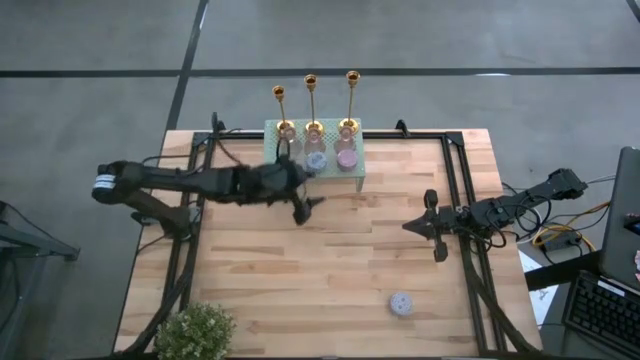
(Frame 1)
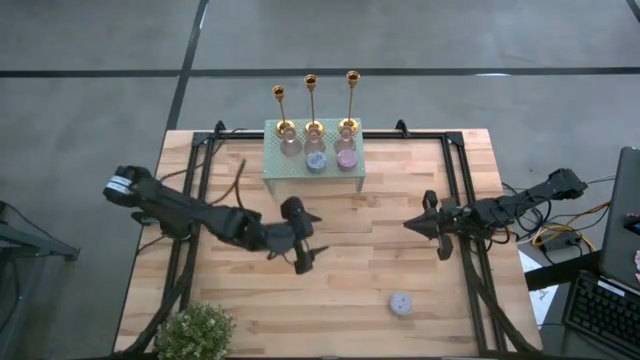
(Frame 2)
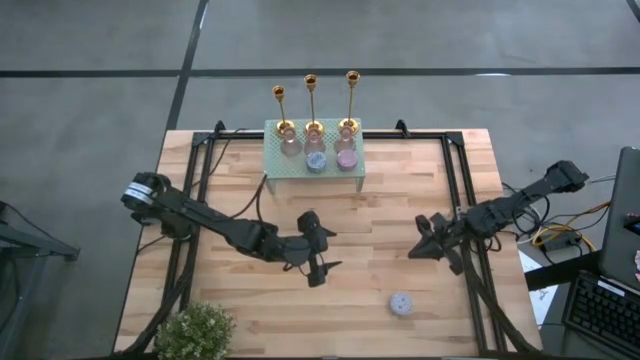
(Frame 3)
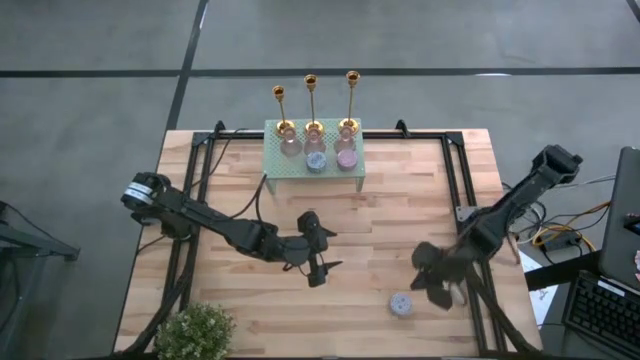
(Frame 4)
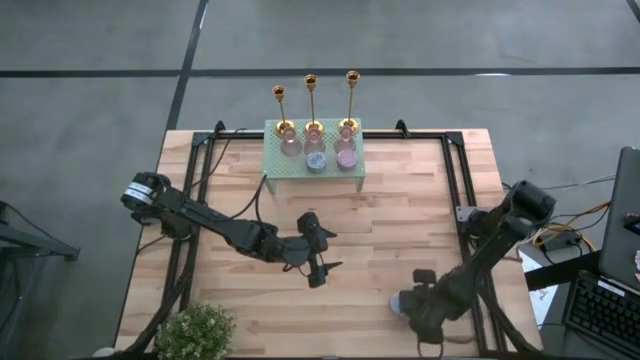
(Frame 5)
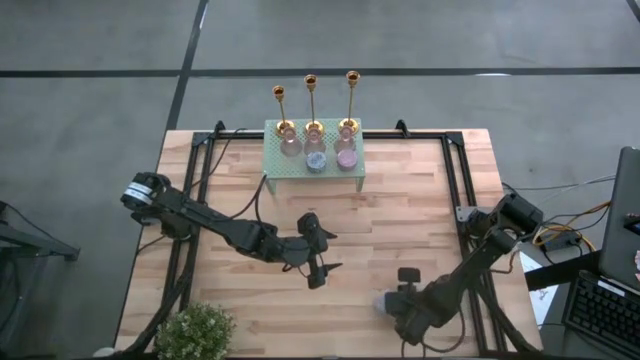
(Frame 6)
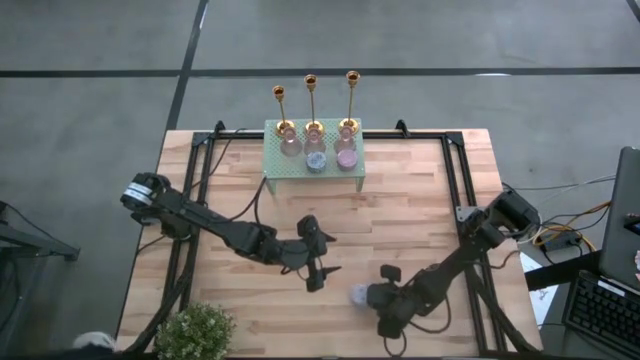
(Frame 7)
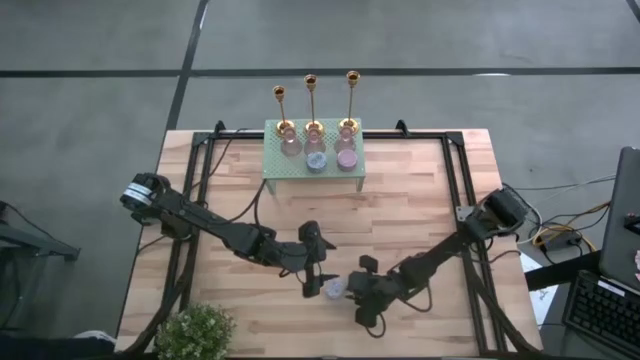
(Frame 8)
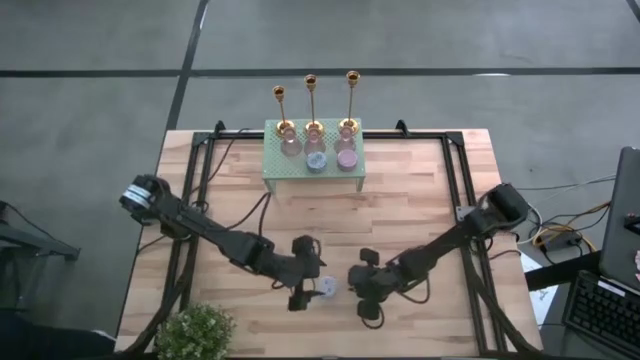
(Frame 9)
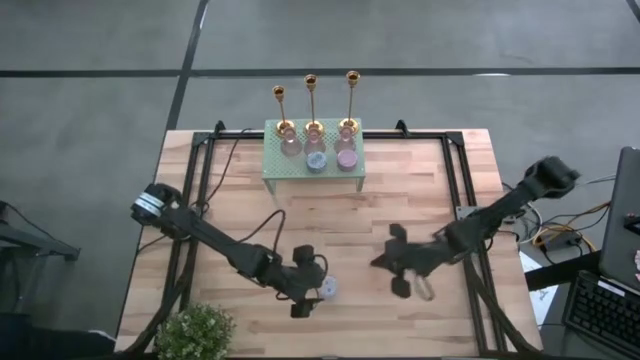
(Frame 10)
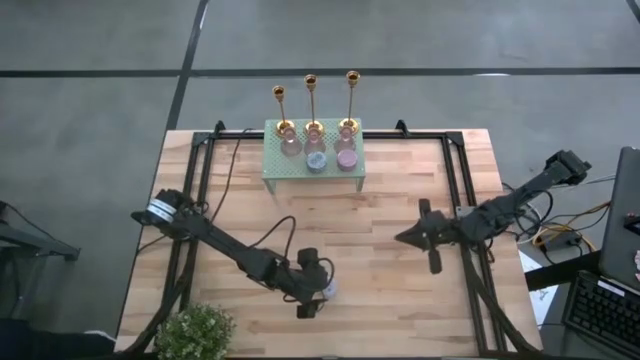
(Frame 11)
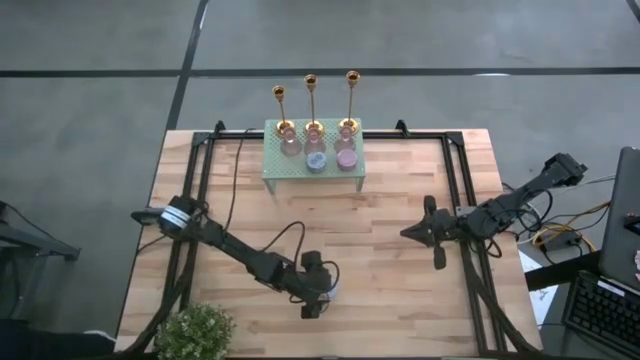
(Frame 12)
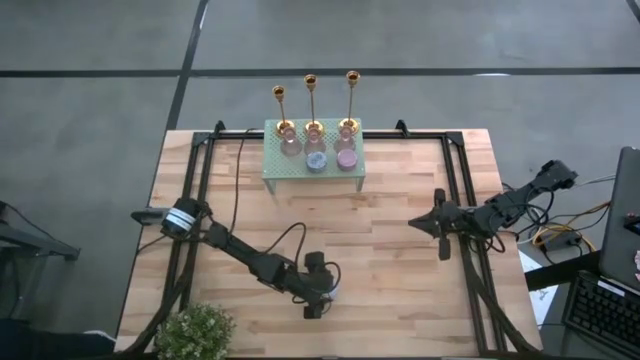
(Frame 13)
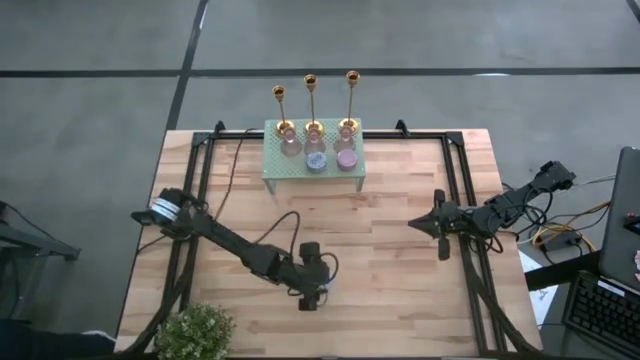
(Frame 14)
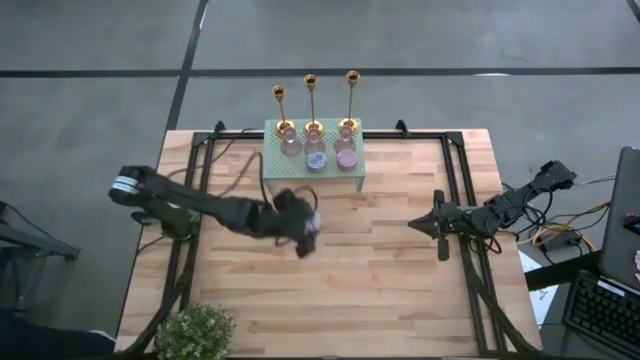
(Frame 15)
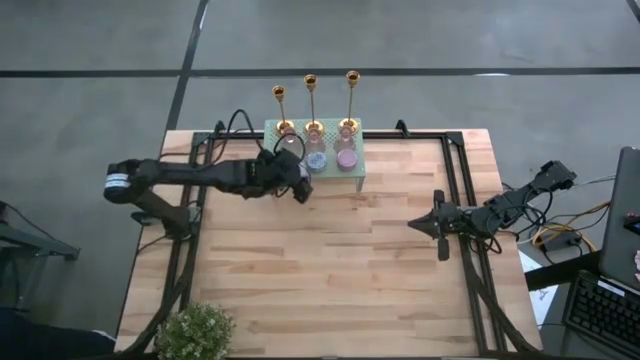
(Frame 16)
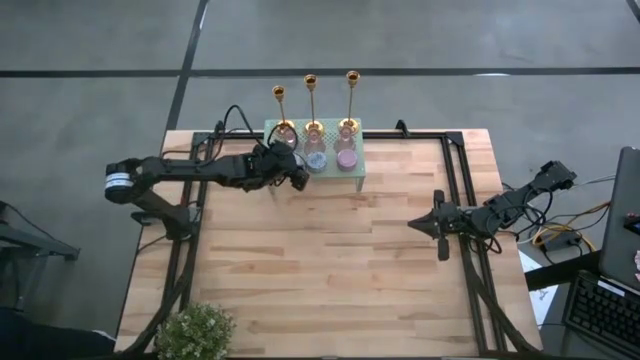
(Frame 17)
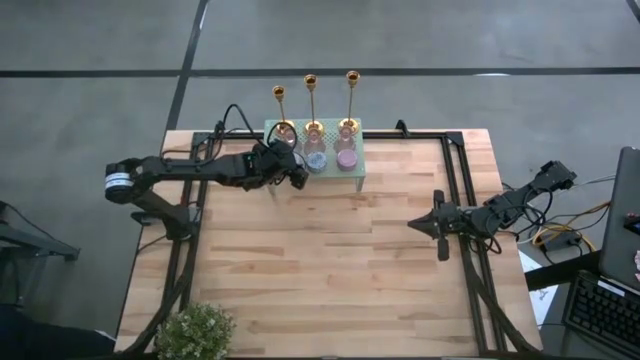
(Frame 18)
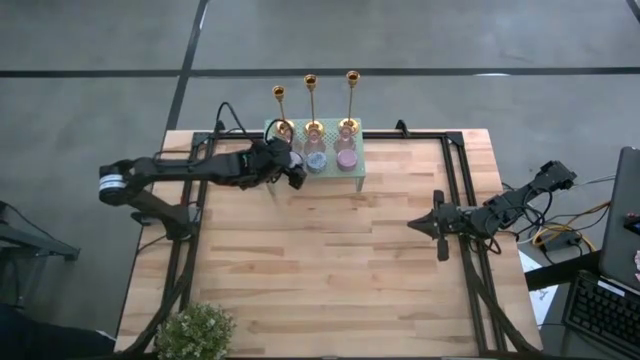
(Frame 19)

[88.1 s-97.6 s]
Task: Pick & Place candle stick holders
Put the pink scented candle on the shelf aligned with the purple and blue scented candles

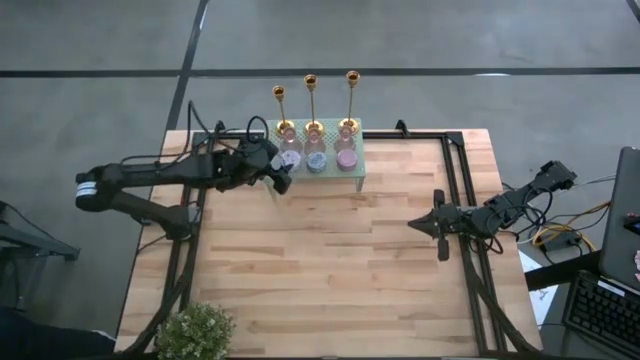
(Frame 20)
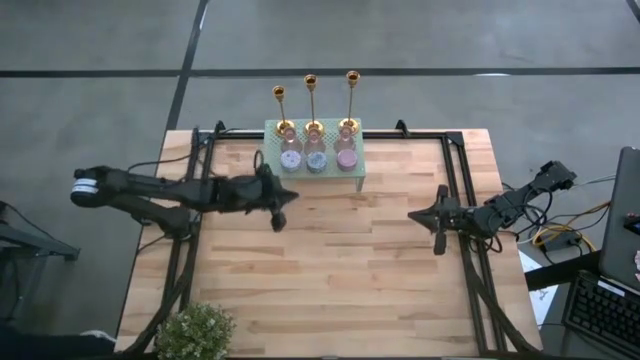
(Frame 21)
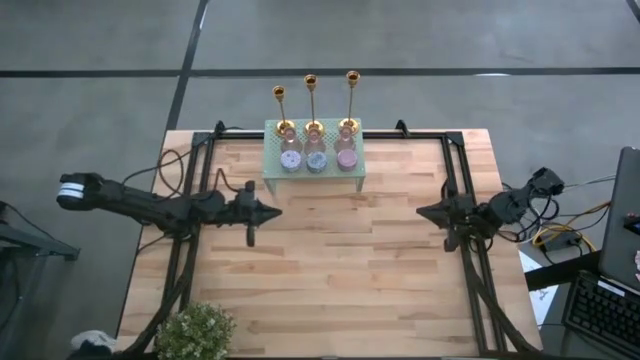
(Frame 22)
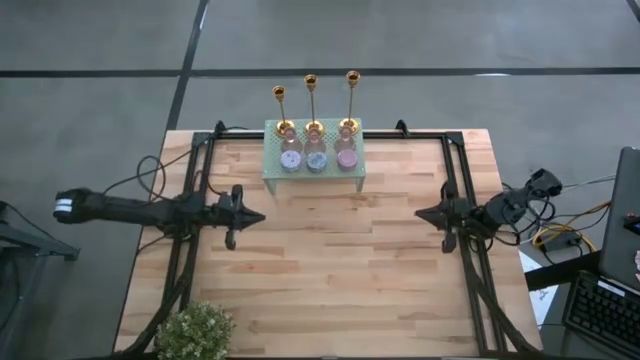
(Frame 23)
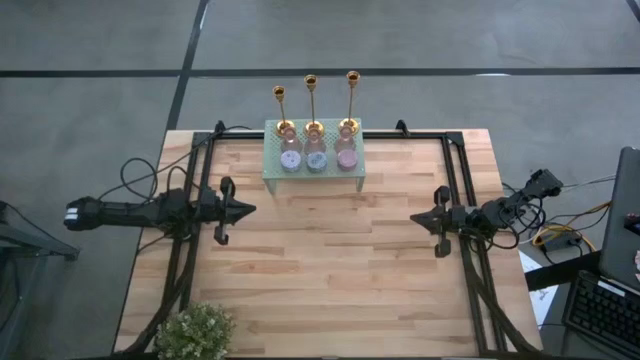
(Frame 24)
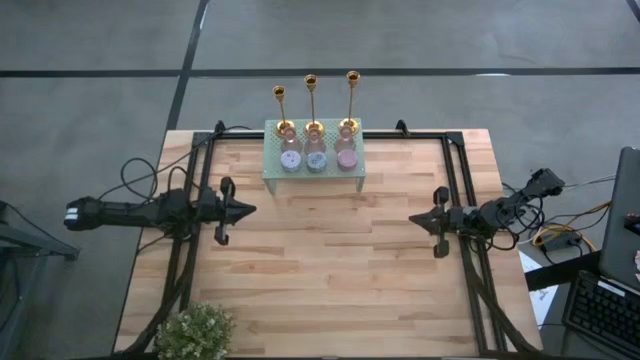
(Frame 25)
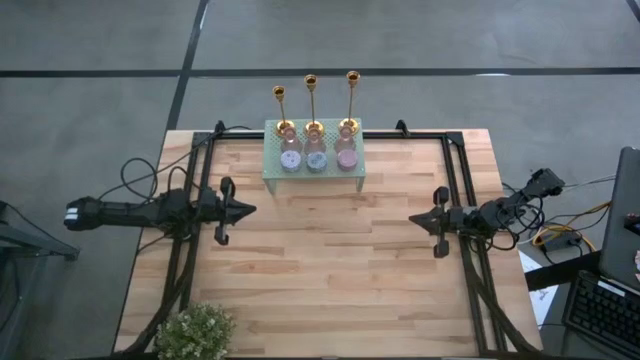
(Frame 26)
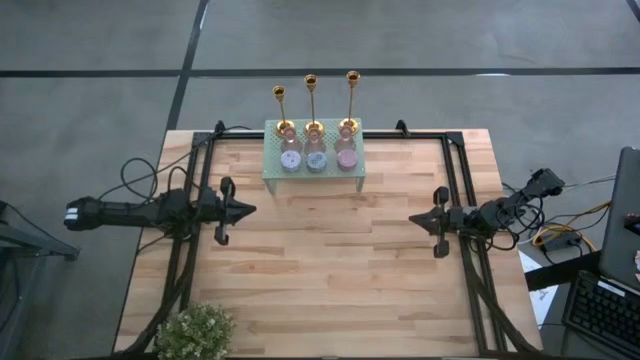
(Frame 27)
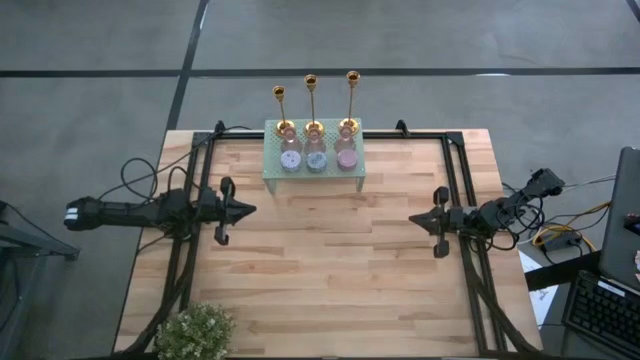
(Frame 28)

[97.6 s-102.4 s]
Return to Home Position

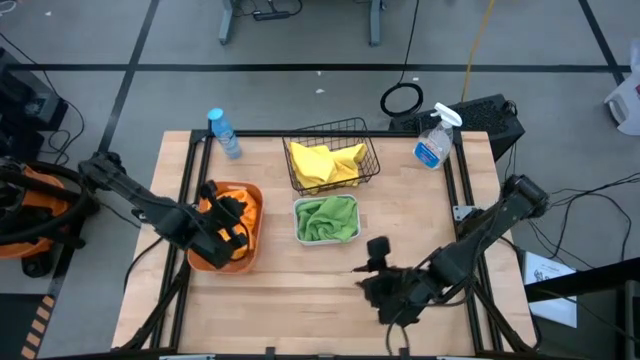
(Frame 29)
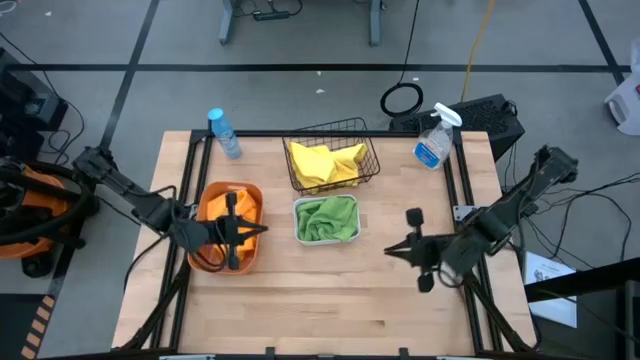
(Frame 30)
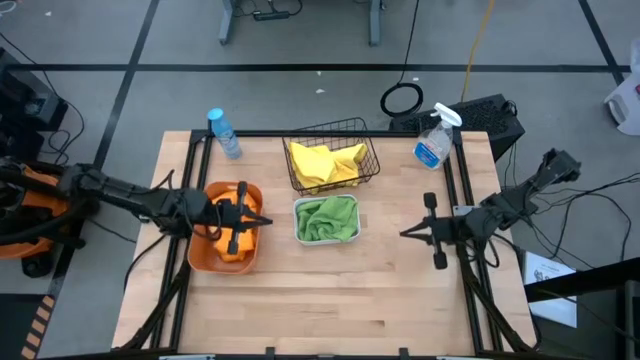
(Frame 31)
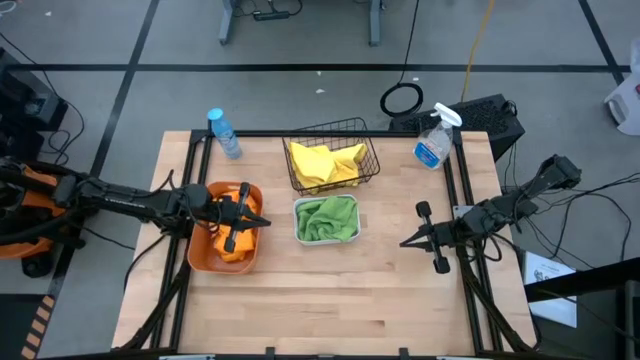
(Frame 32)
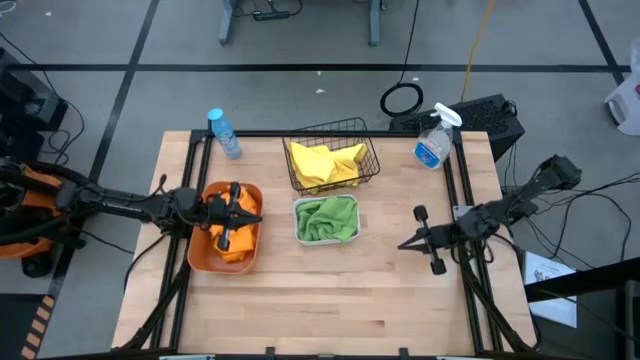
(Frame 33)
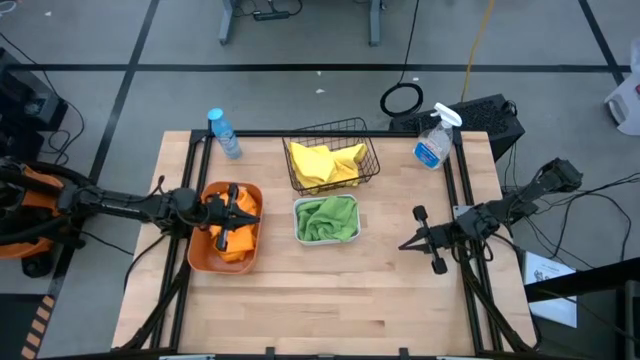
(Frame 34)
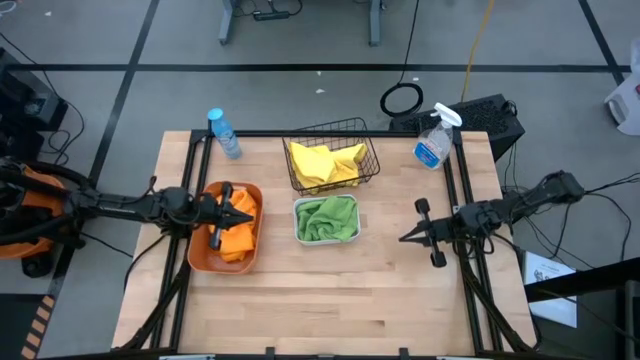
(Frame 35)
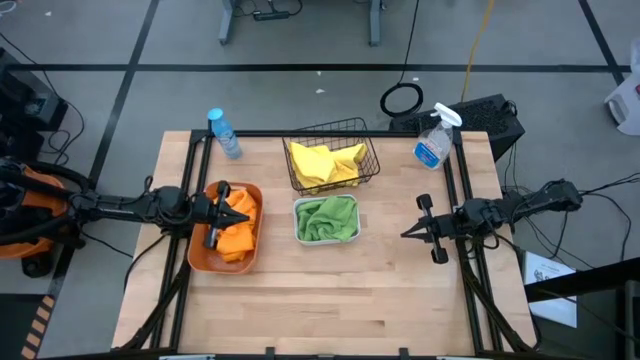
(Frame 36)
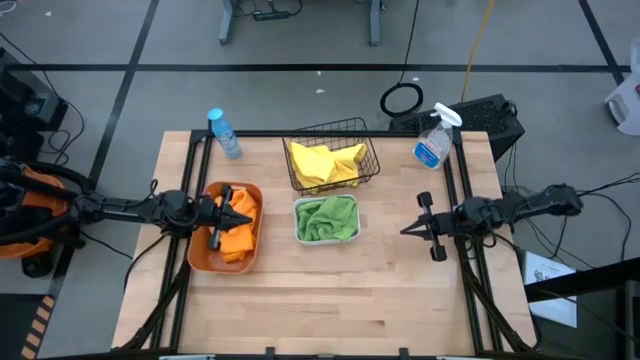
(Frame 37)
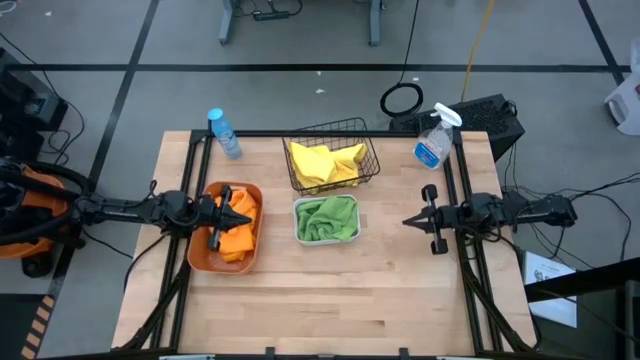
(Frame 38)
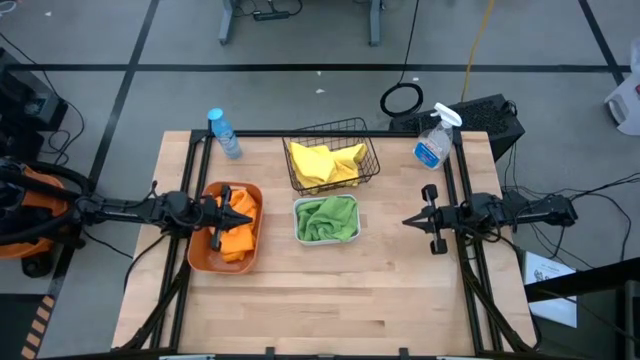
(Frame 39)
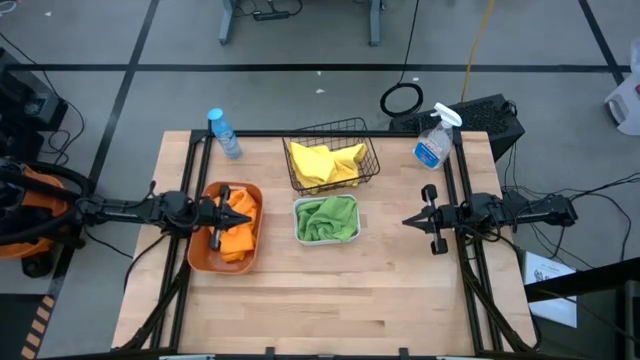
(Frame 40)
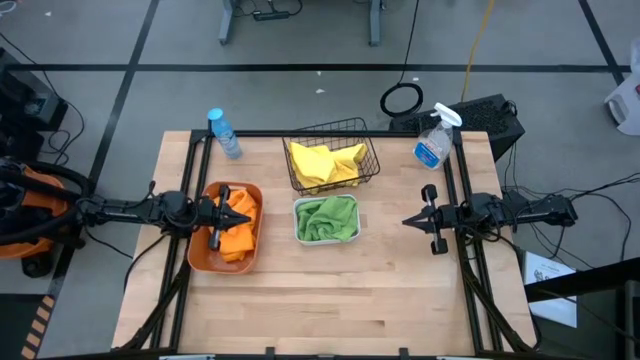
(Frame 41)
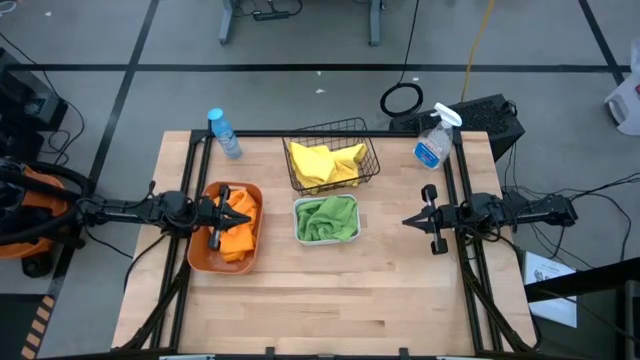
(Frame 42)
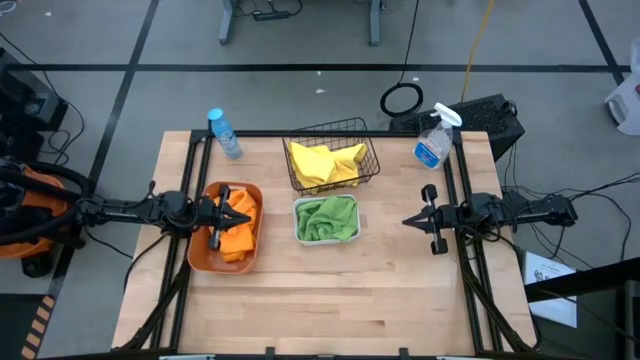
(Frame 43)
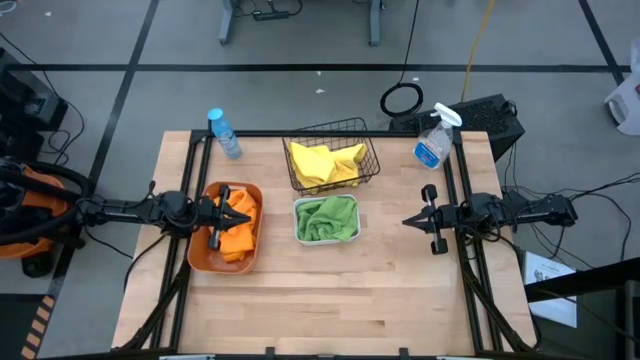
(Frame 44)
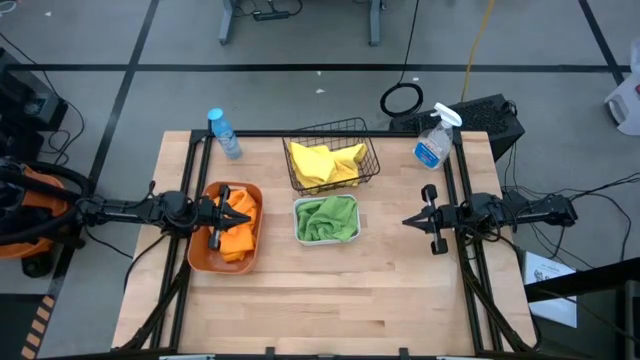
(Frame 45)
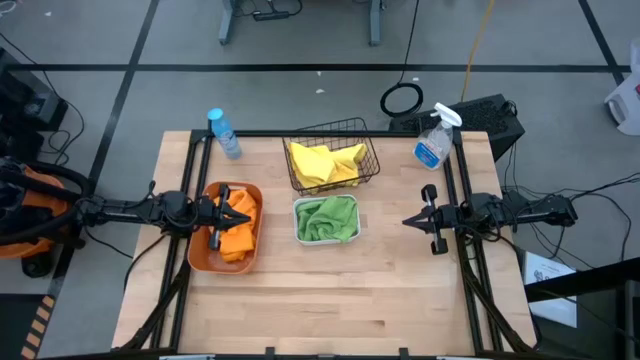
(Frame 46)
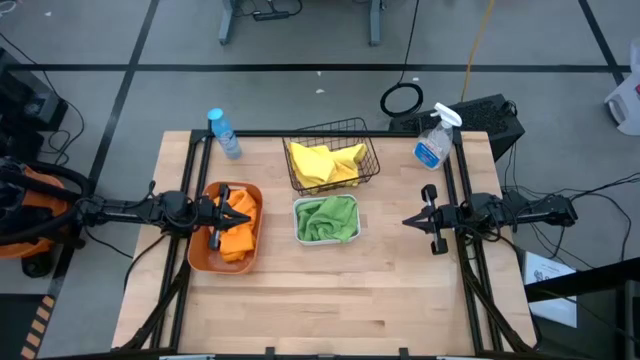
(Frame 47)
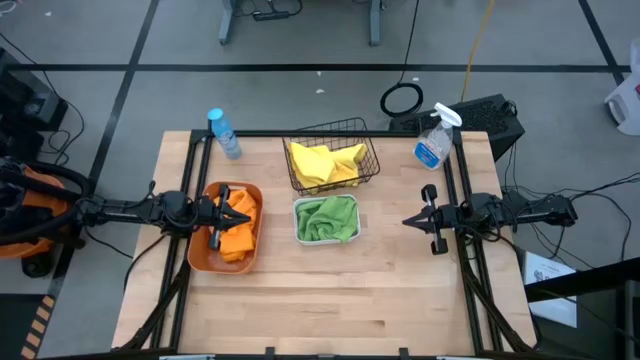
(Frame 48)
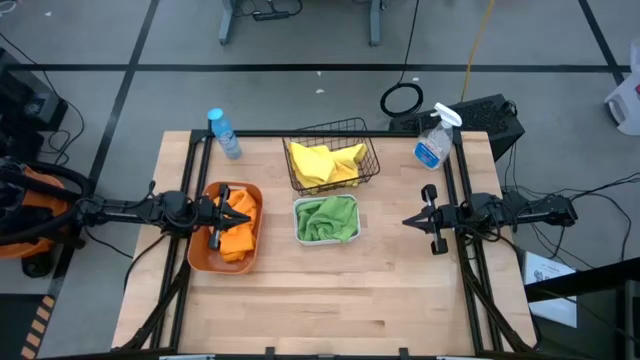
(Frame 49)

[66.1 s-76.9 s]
Task: Sort microfiber towel by color & place in baskets
Return to Home Position
